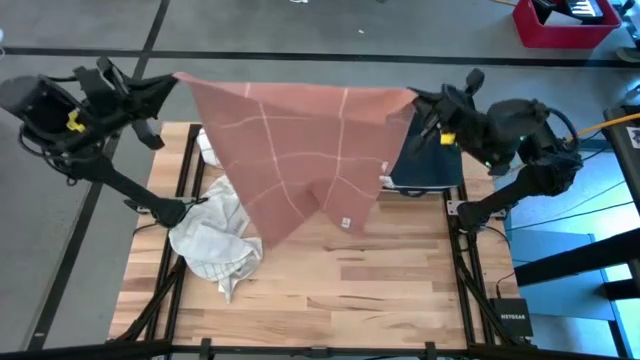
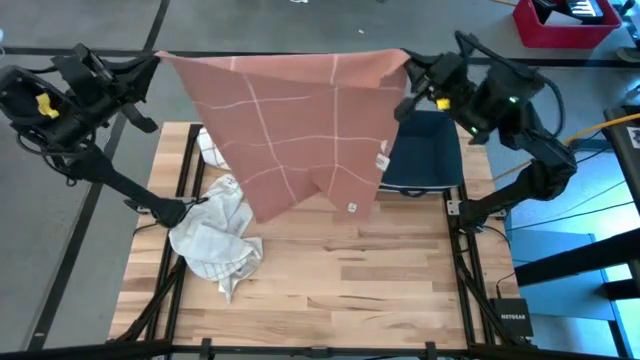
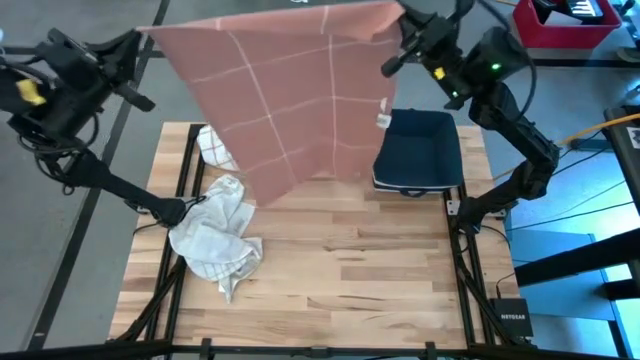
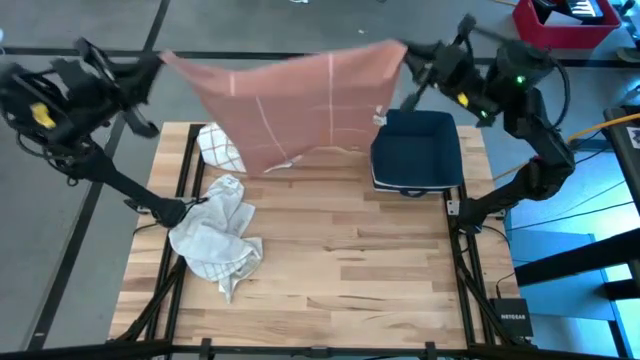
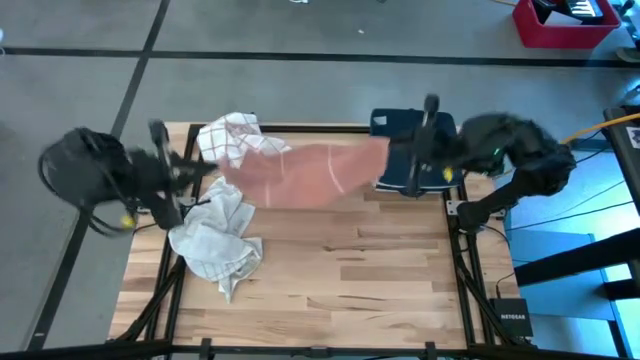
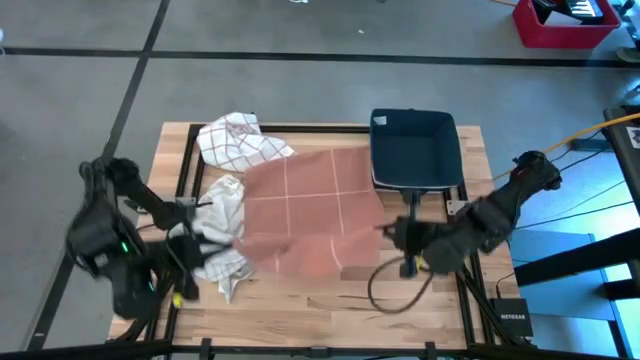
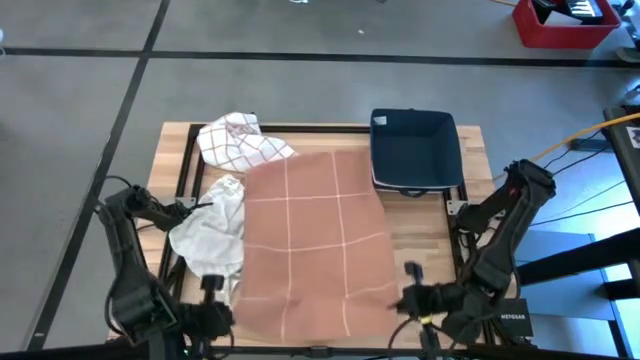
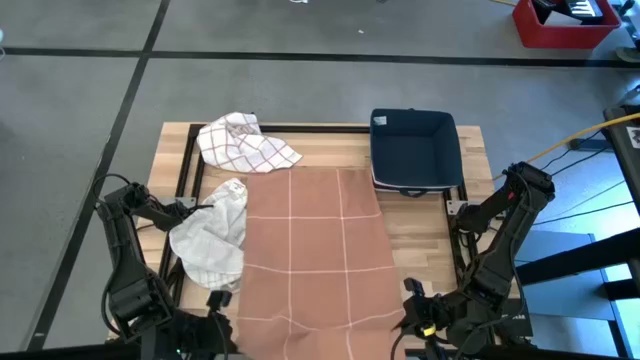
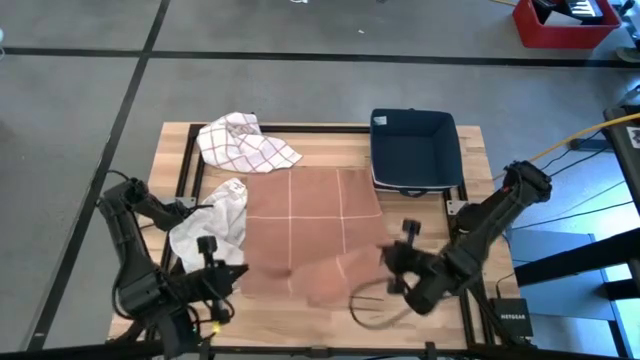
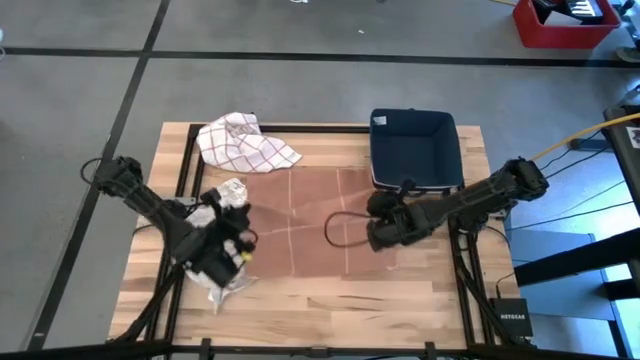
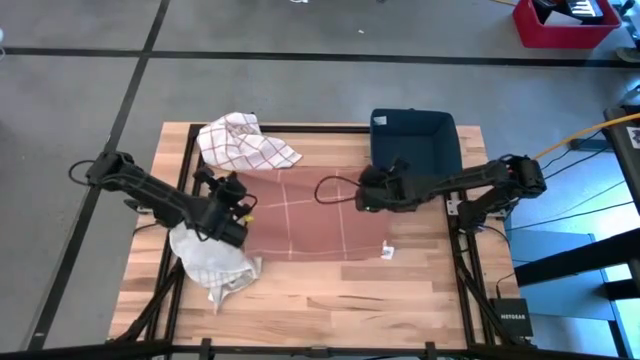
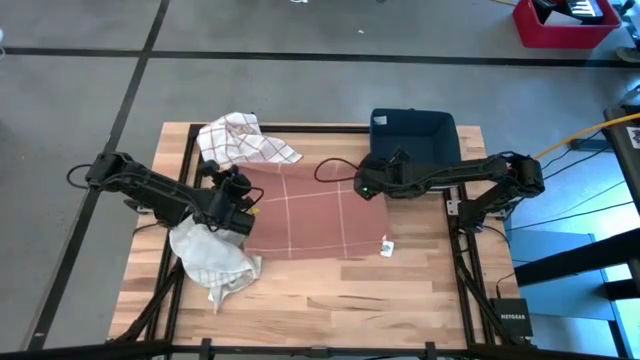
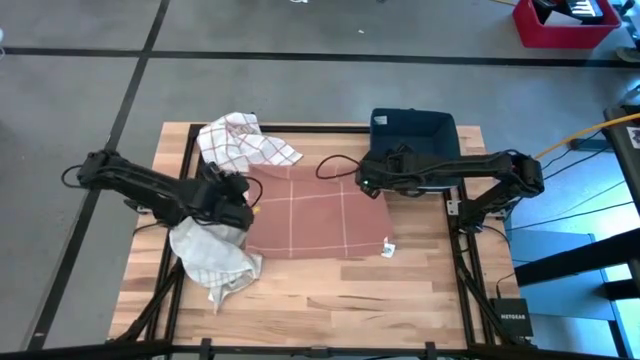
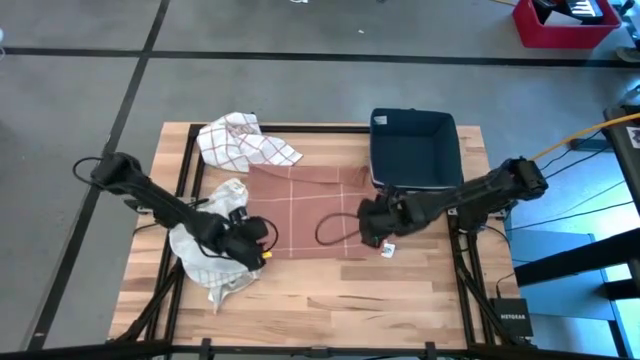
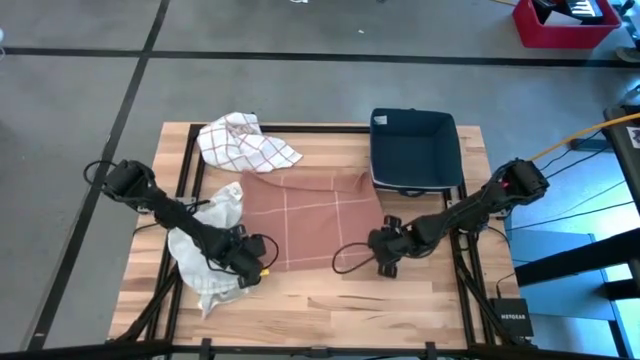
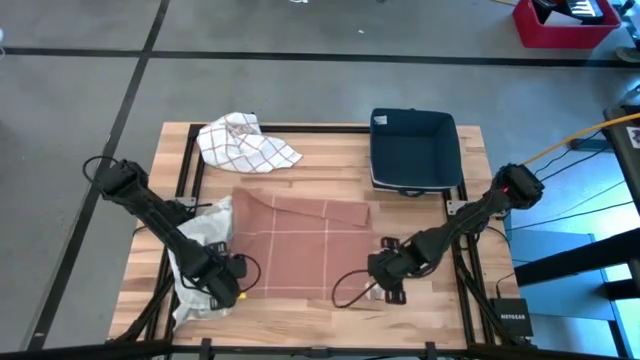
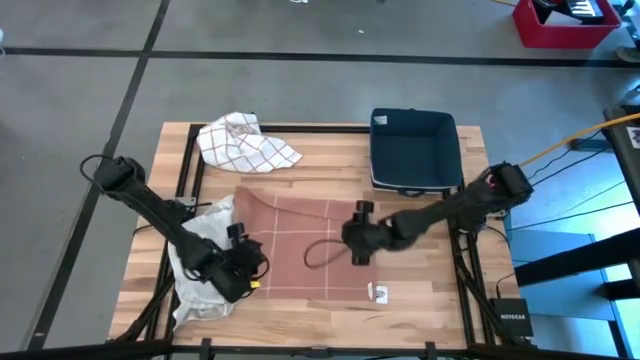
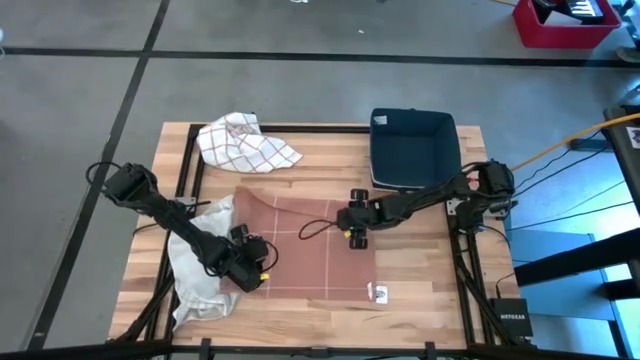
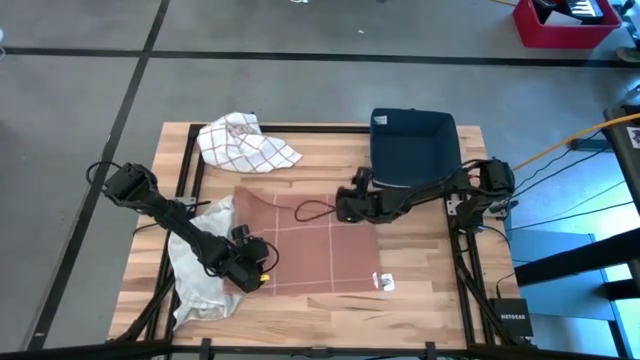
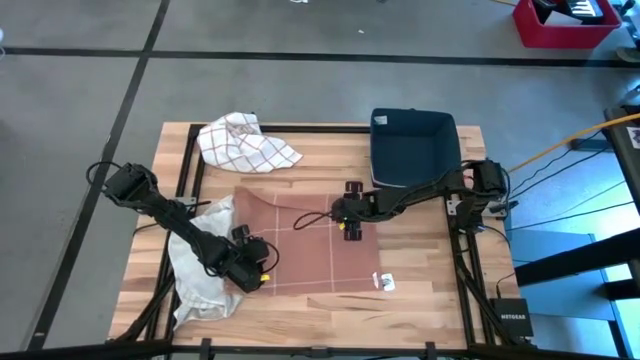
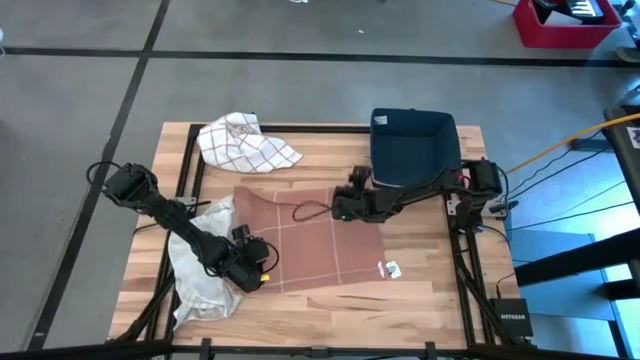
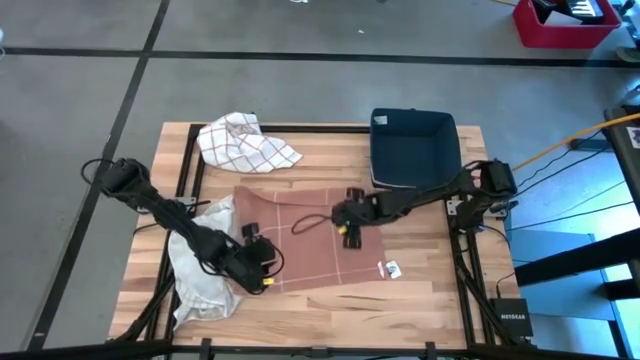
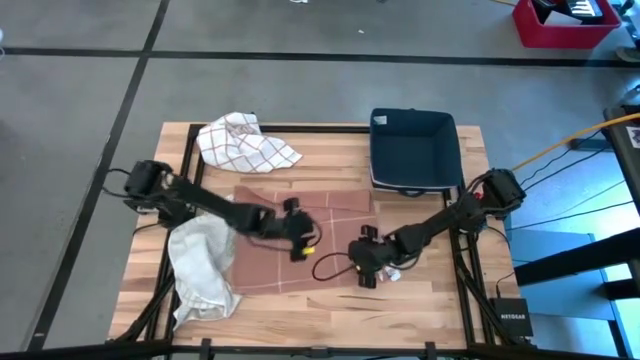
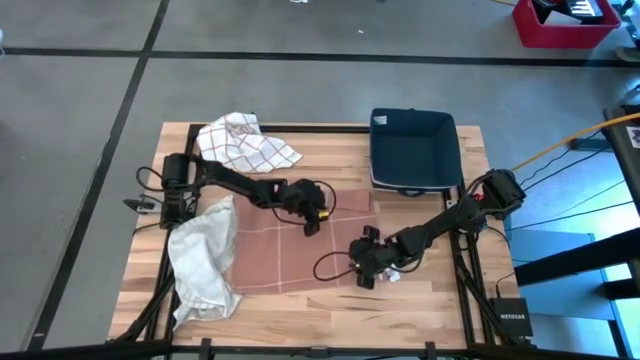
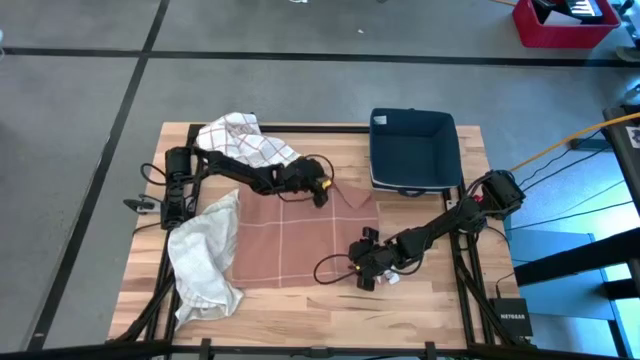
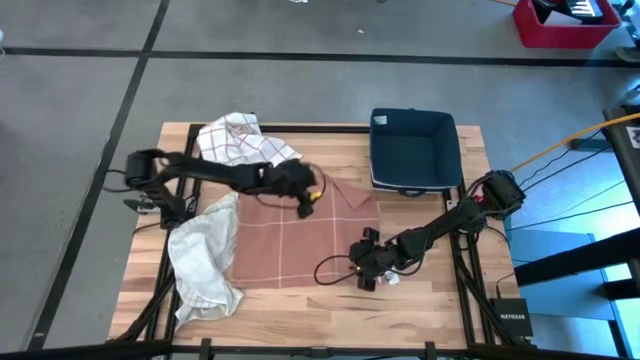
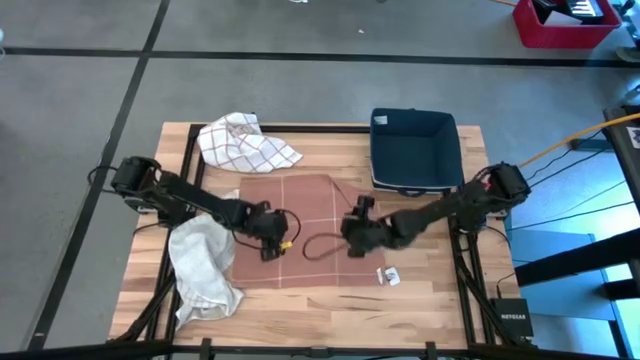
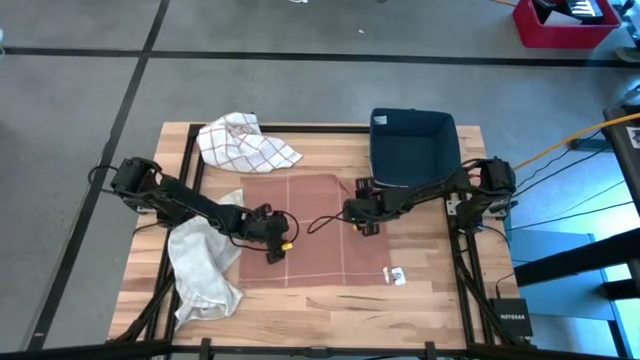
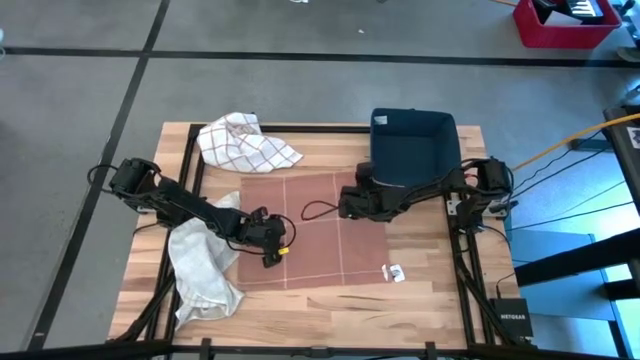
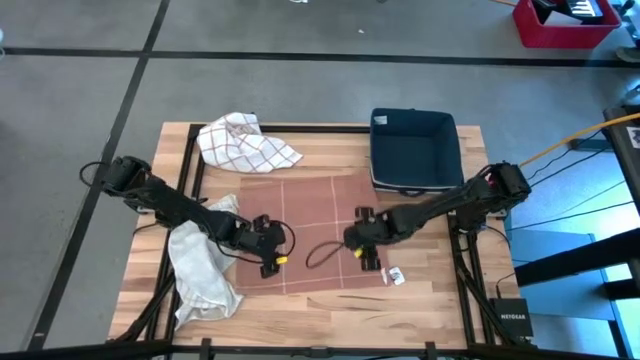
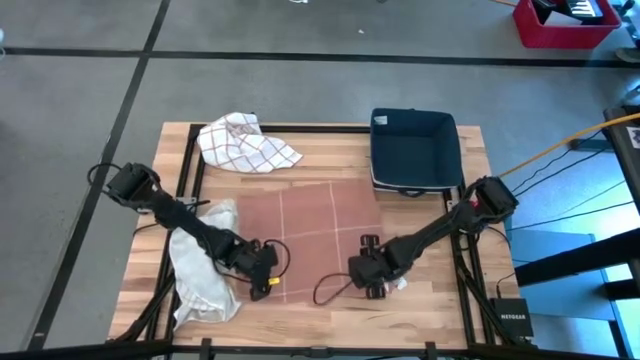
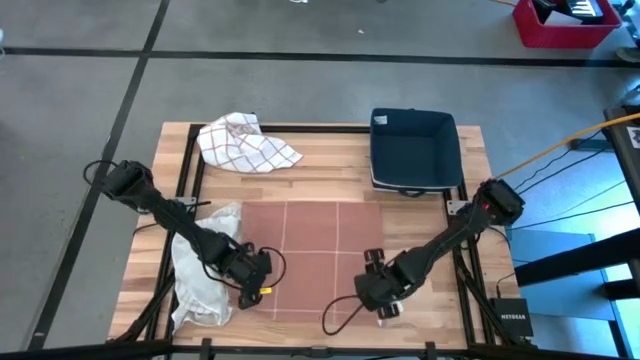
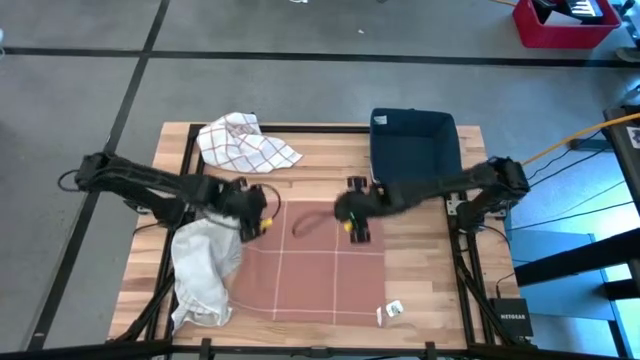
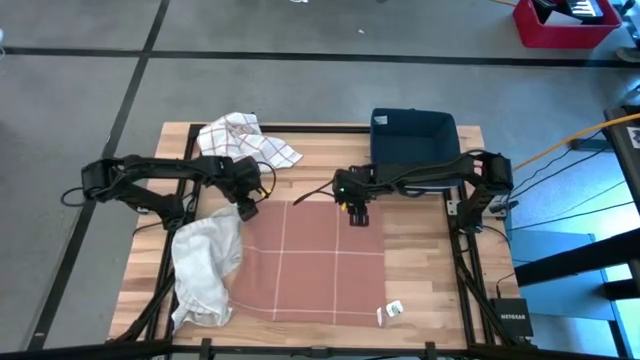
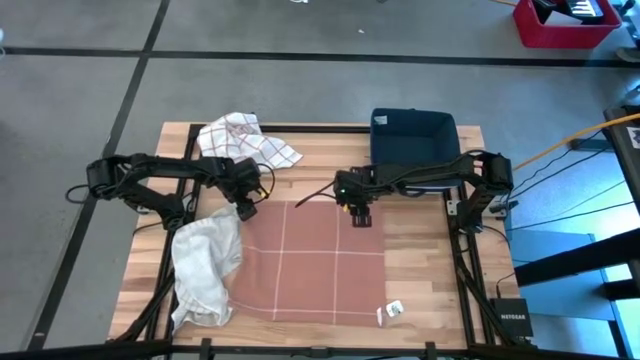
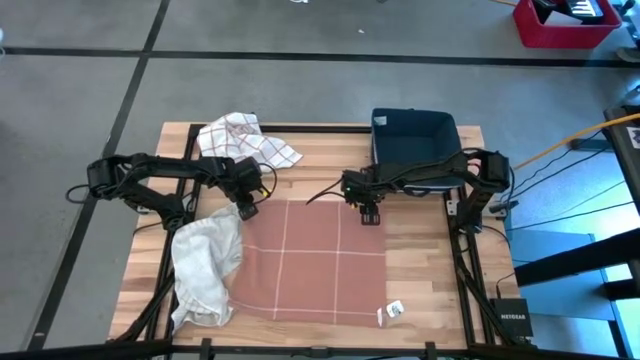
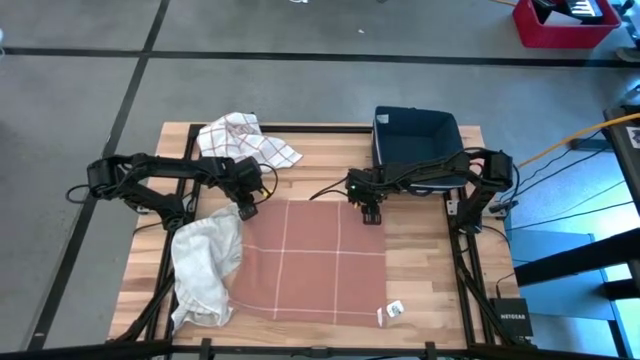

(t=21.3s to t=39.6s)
Task: Fold towel
Fold the brown towel

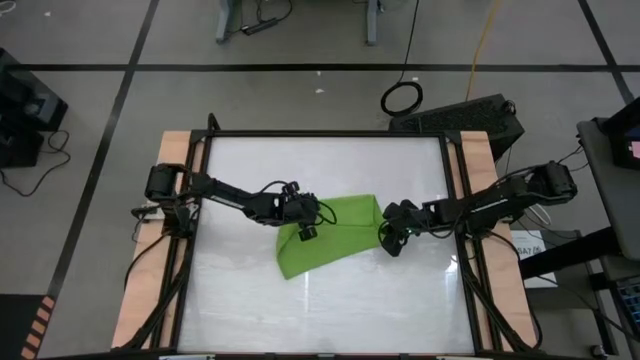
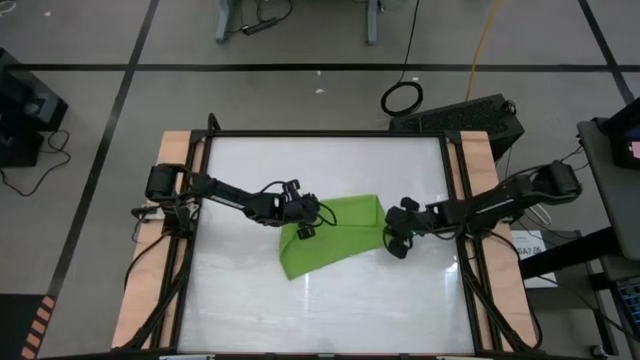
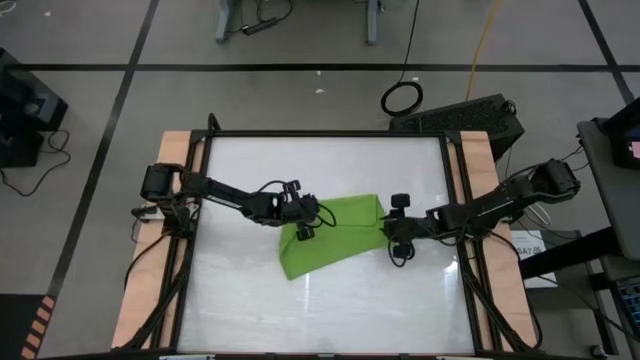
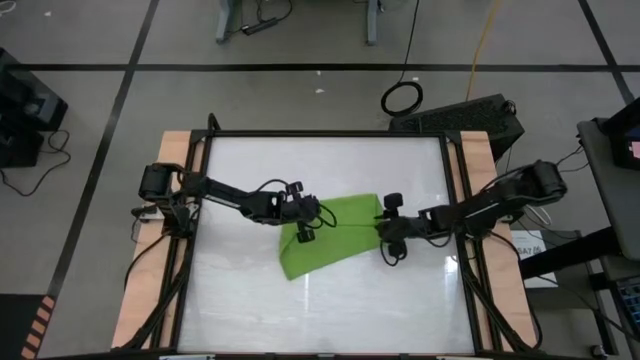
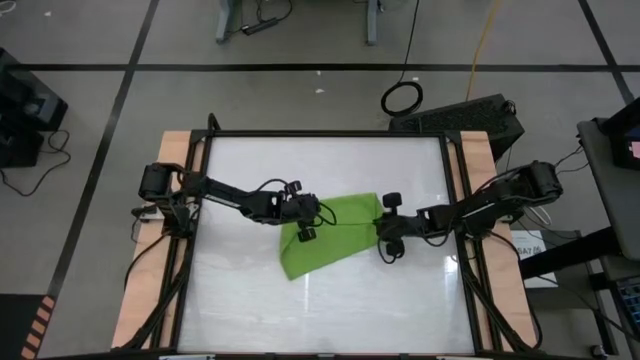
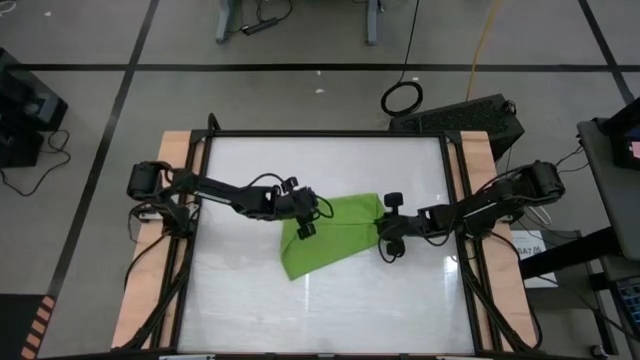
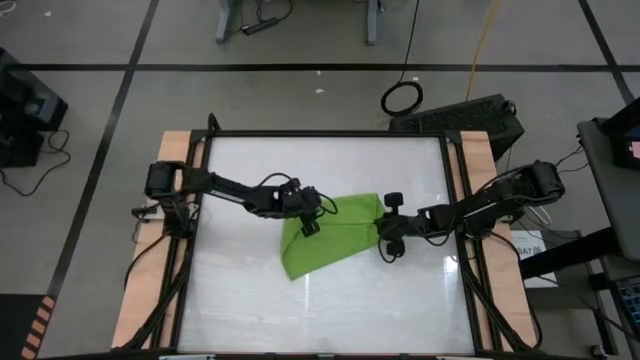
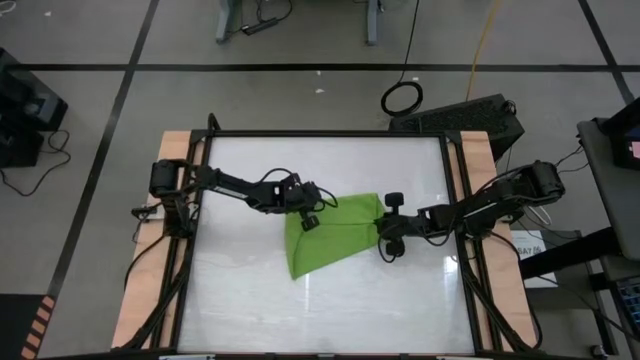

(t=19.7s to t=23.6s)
Task: Roll towel
Fold the green towel
